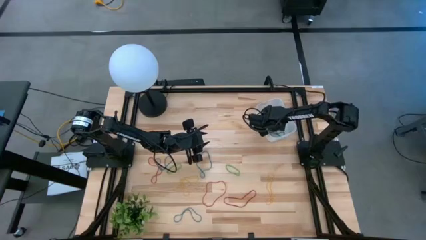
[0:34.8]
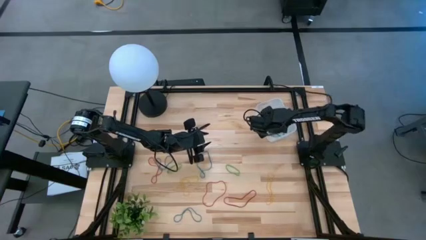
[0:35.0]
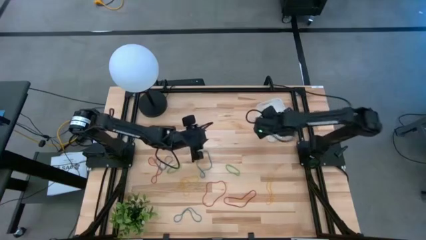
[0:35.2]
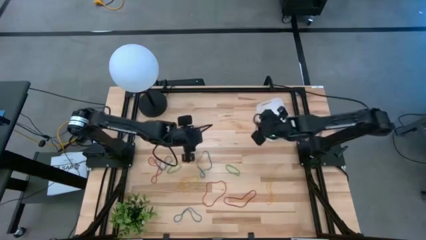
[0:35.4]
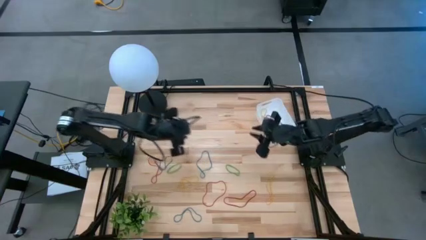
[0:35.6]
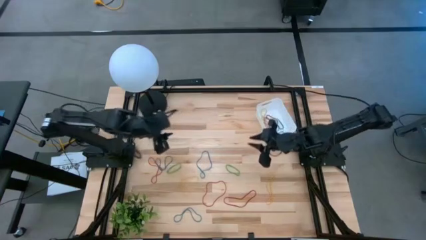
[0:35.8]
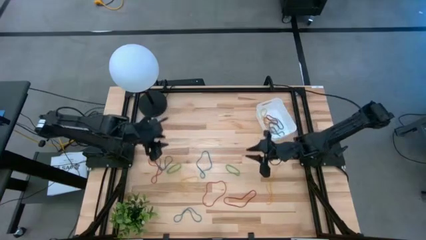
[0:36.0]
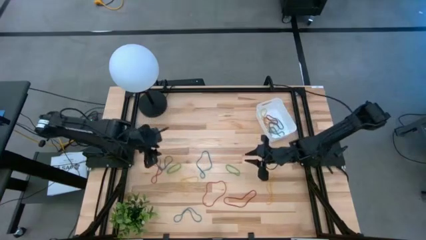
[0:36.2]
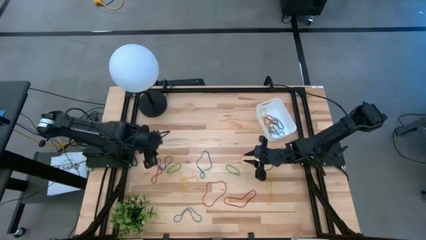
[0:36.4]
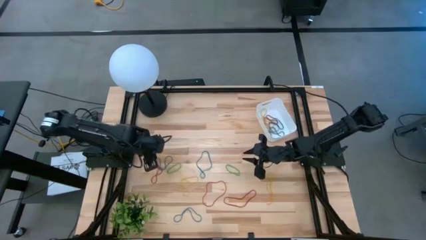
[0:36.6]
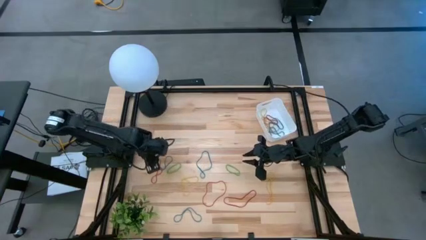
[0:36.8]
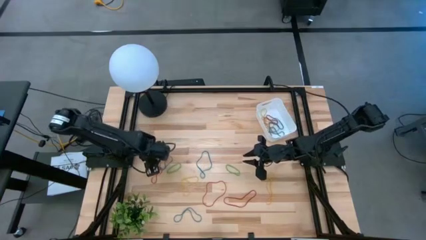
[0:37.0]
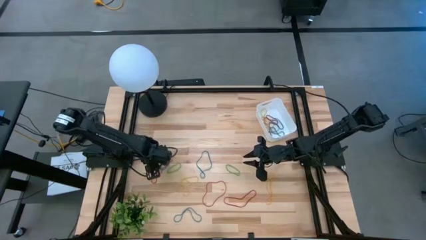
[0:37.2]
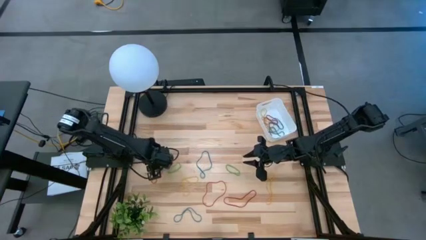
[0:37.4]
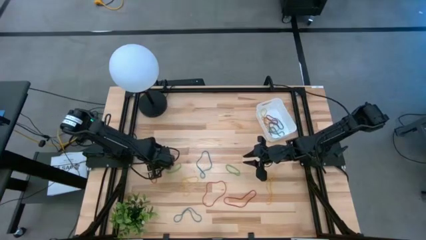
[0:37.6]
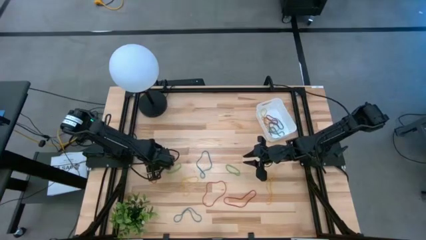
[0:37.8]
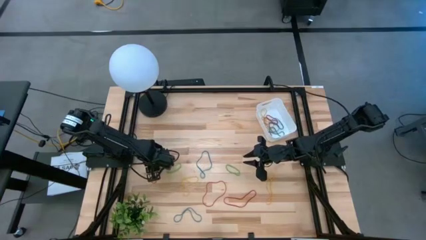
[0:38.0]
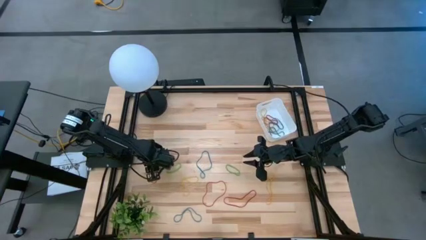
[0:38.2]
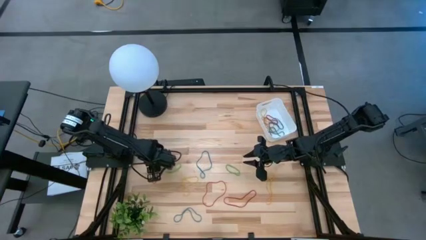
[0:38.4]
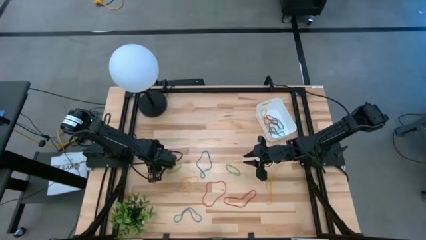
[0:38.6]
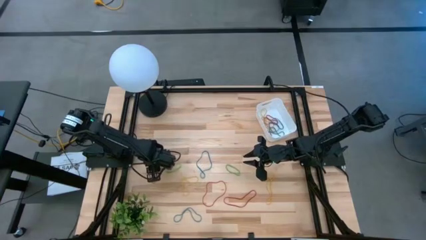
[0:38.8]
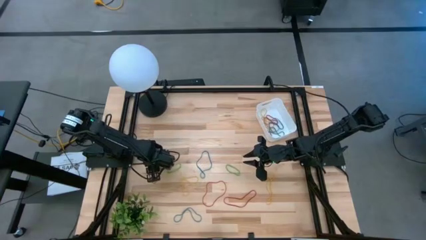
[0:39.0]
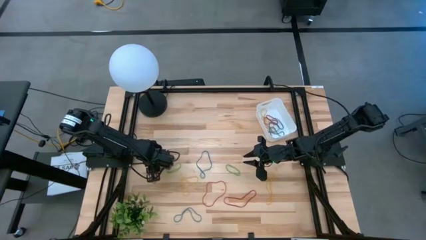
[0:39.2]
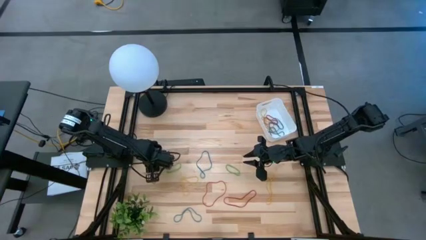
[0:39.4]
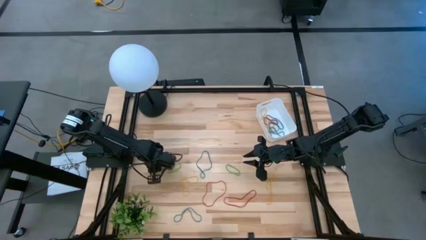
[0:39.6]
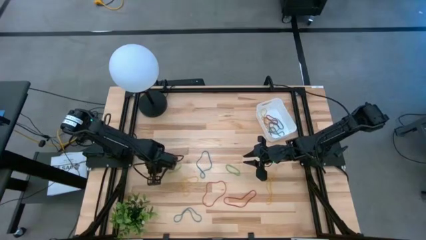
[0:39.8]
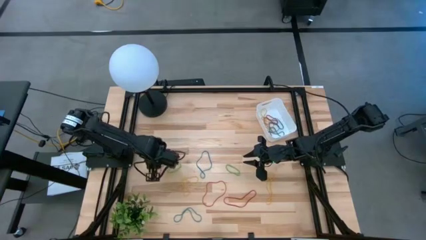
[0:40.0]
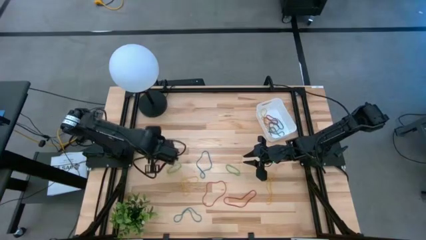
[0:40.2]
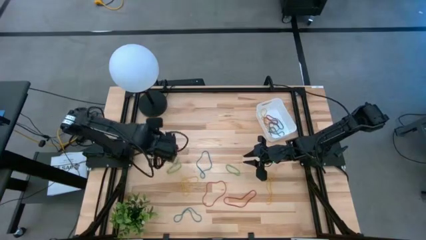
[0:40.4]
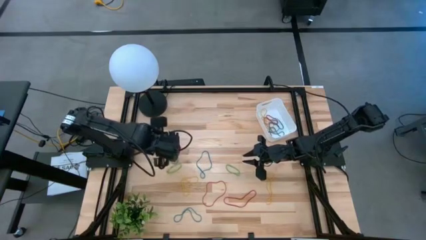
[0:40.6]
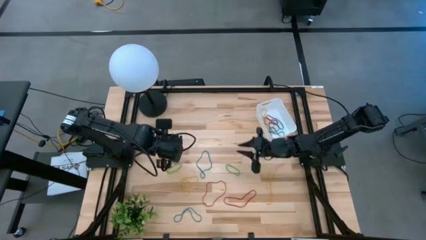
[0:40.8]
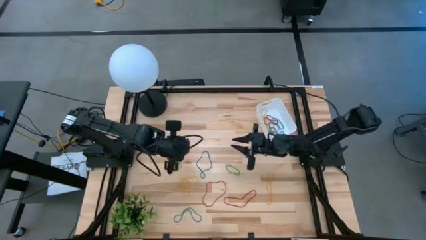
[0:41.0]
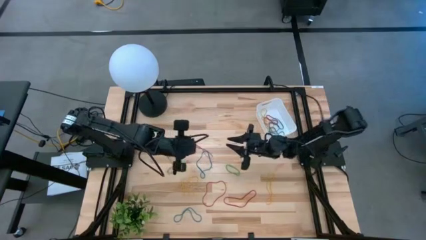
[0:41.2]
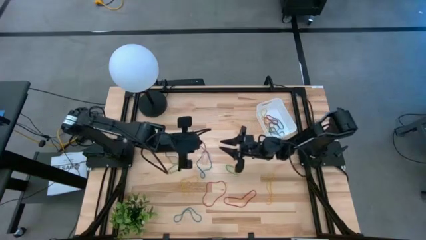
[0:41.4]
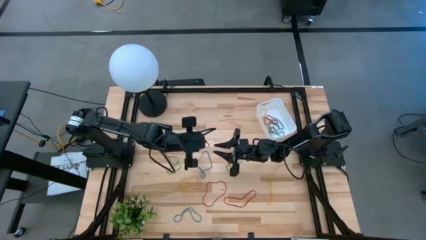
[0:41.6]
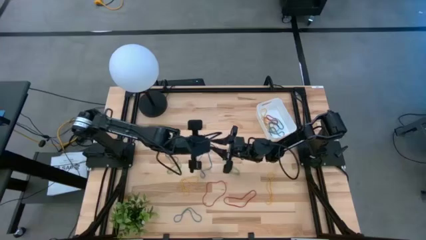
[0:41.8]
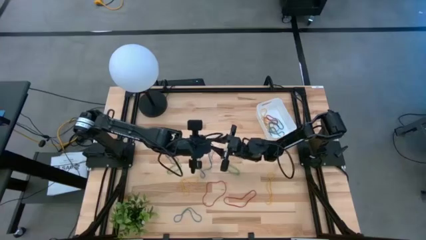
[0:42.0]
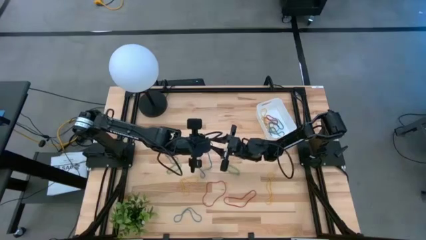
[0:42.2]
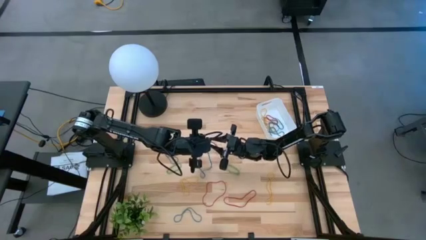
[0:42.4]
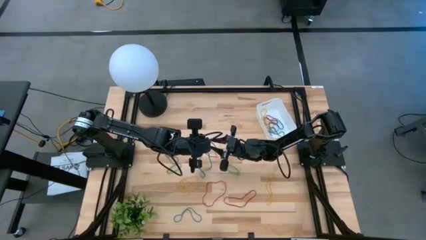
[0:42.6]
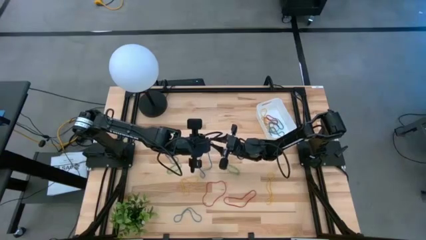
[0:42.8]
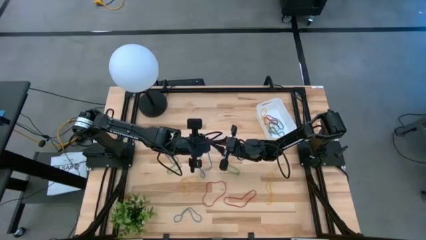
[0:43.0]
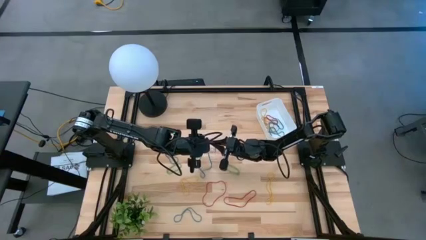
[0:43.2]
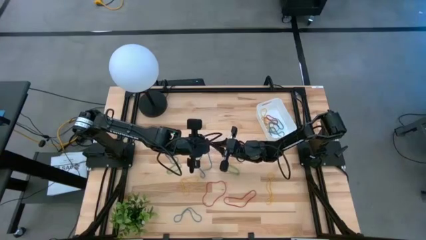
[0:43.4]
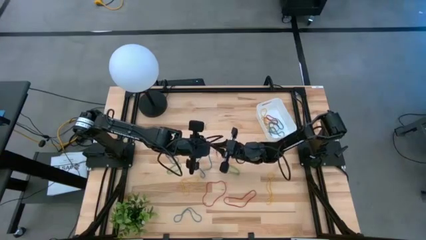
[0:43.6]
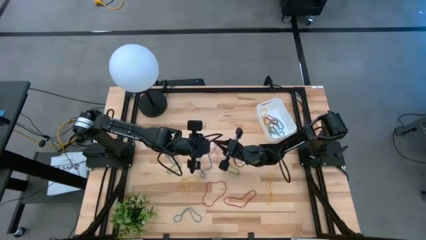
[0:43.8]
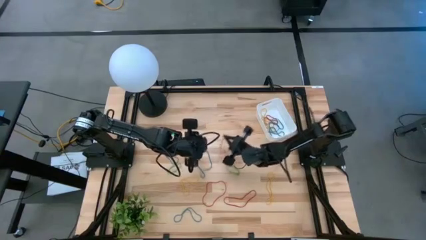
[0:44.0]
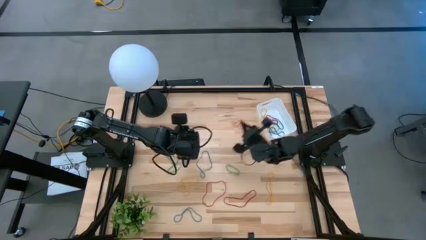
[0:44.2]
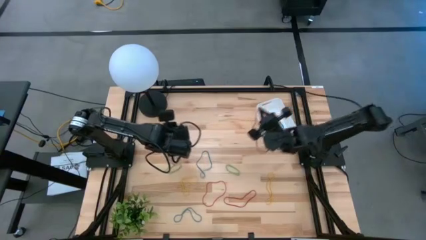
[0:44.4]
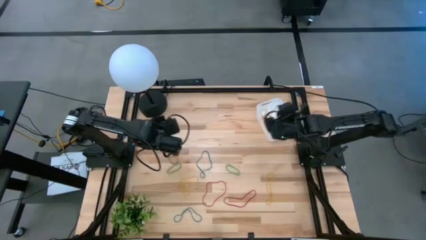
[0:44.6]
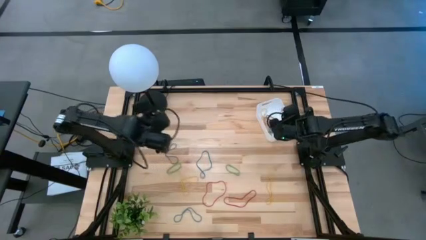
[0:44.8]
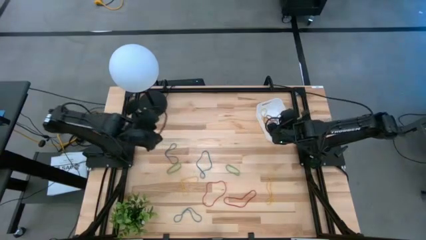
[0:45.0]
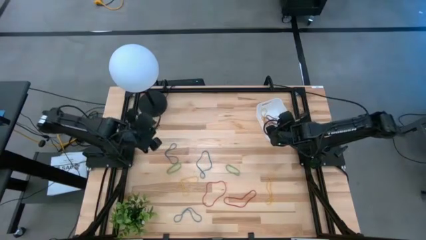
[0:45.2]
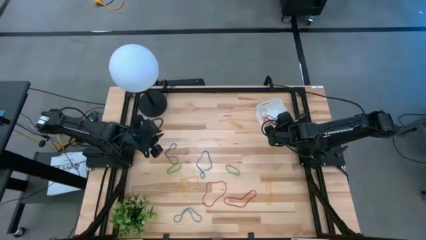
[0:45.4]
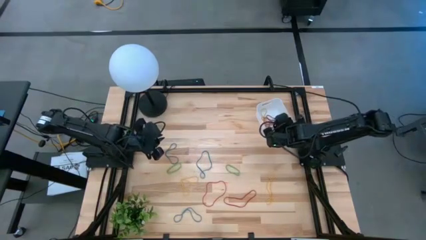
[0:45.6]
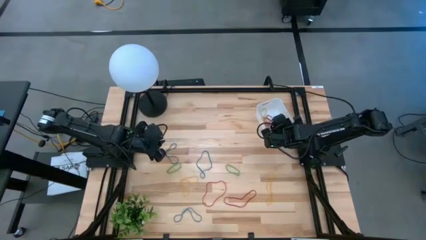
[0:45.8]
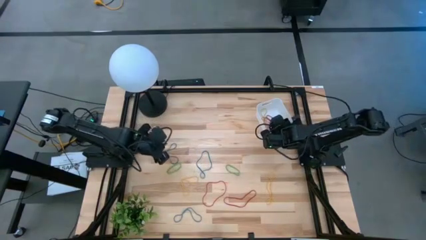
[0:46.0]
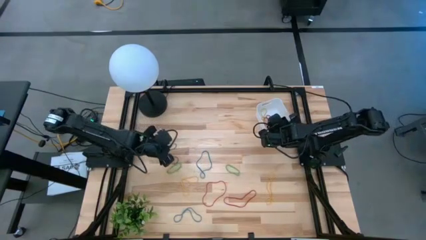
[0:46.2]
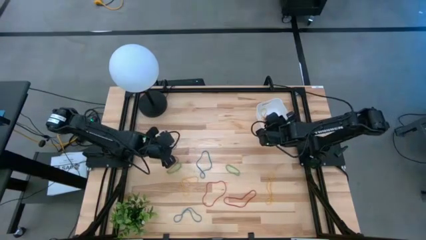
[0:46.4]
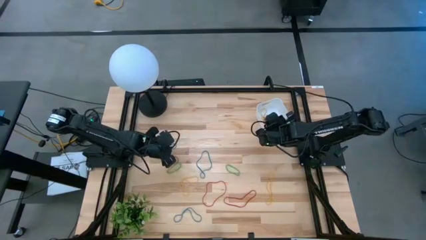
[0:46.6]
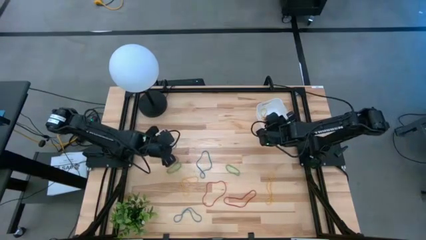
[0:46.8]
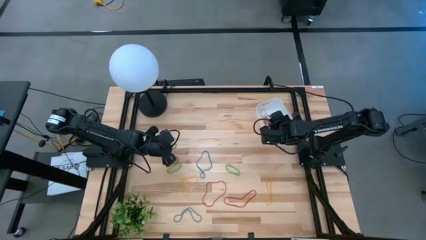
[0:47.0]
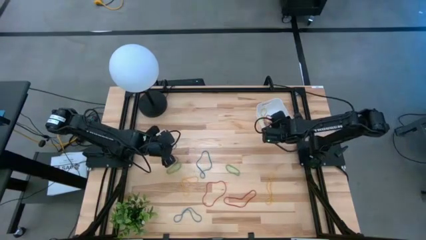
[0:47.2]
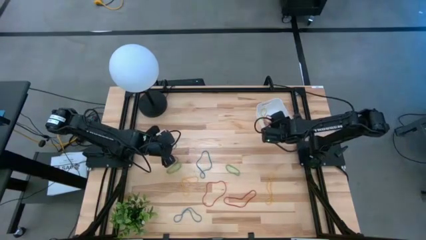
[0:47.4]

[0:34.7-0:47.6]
Task: Pick and place items into bin
Put the left red rubber band into the white bin
